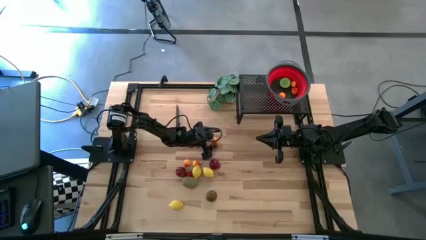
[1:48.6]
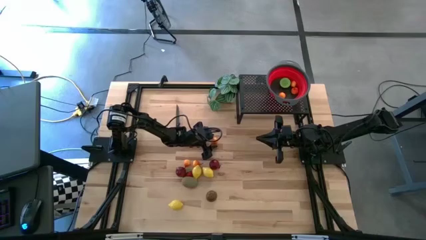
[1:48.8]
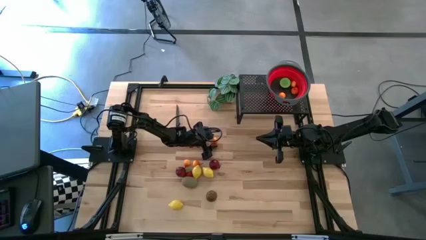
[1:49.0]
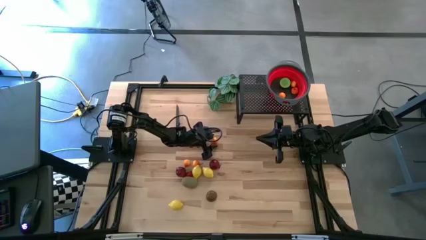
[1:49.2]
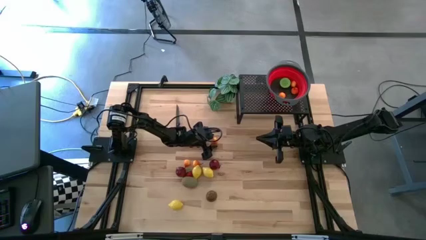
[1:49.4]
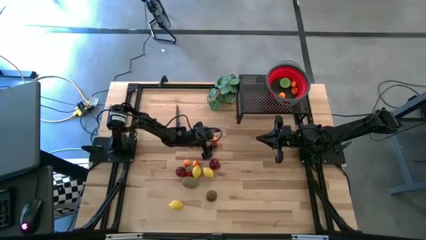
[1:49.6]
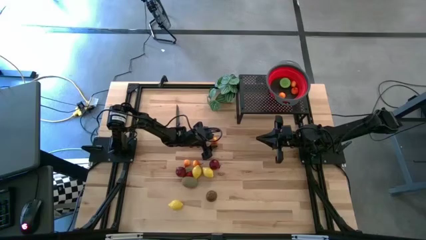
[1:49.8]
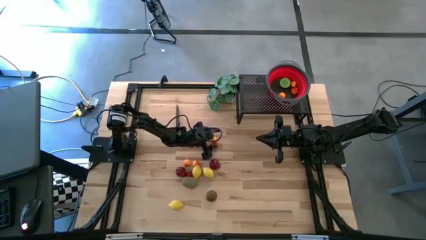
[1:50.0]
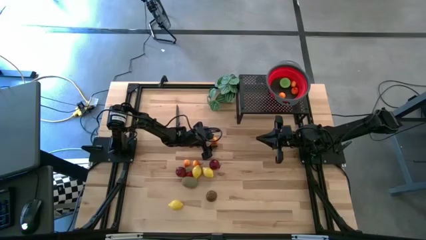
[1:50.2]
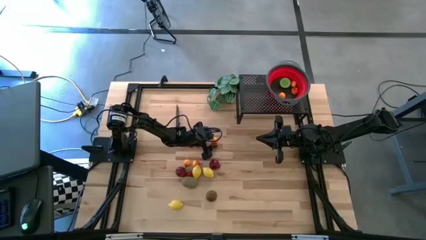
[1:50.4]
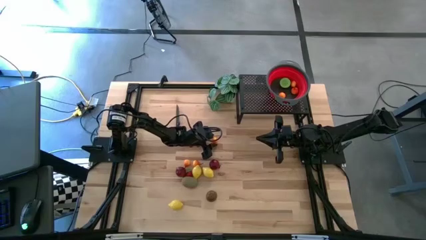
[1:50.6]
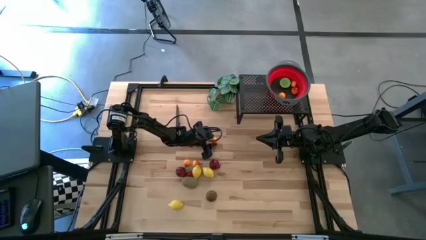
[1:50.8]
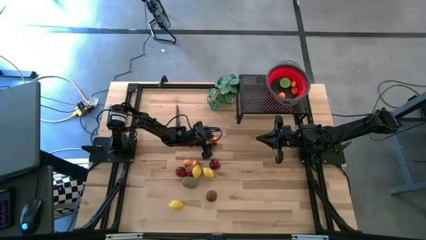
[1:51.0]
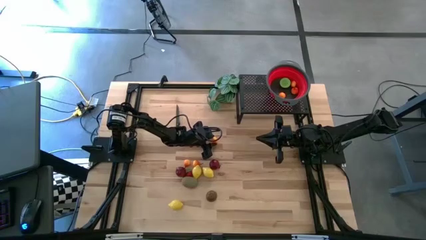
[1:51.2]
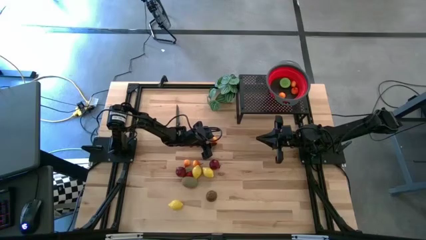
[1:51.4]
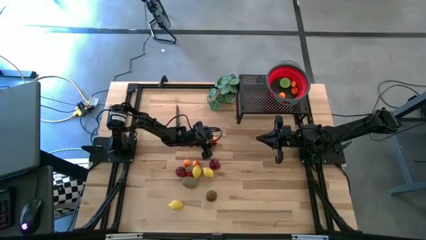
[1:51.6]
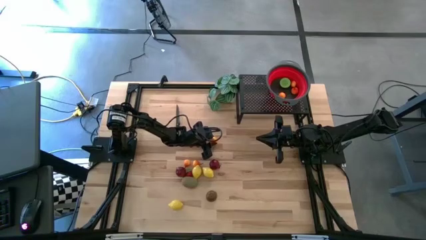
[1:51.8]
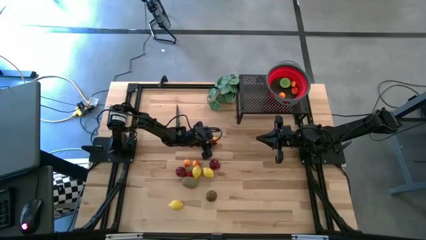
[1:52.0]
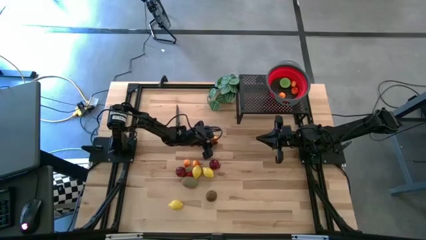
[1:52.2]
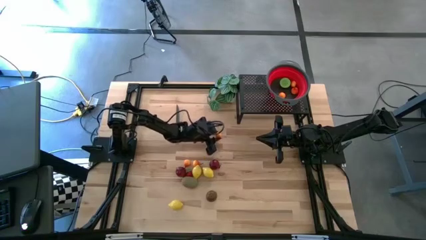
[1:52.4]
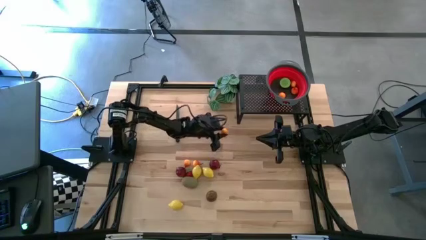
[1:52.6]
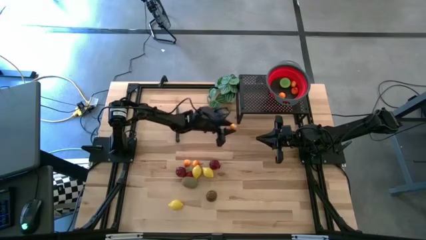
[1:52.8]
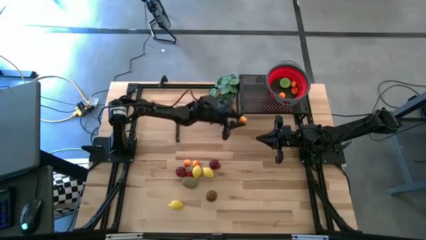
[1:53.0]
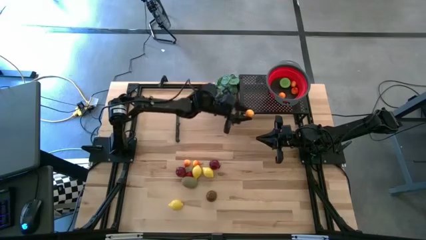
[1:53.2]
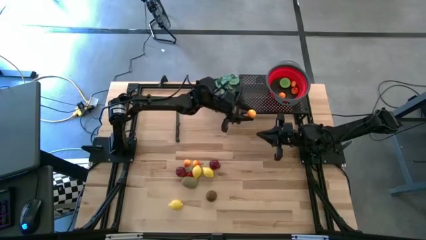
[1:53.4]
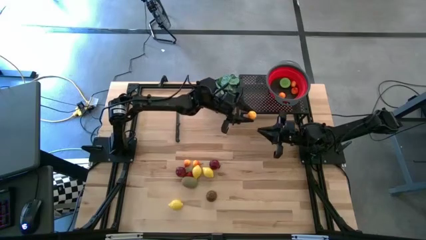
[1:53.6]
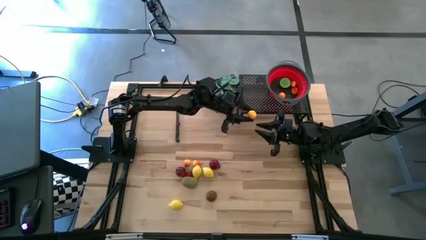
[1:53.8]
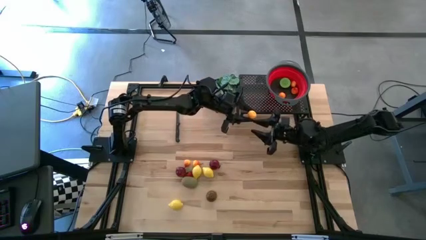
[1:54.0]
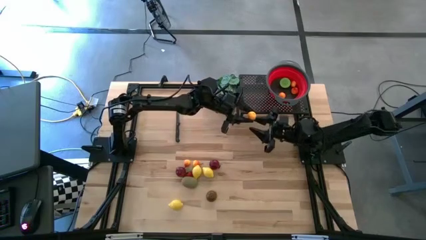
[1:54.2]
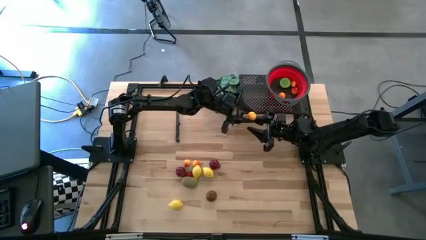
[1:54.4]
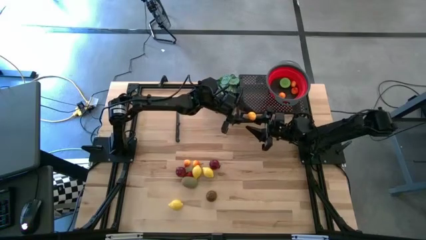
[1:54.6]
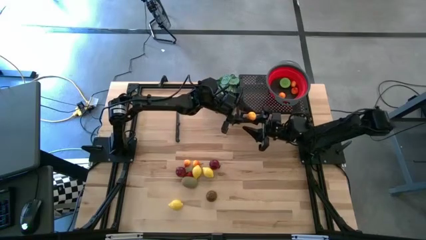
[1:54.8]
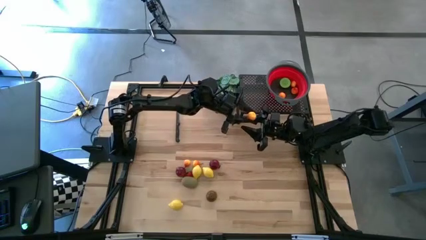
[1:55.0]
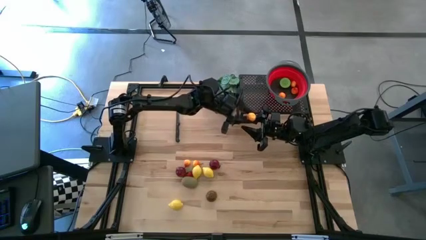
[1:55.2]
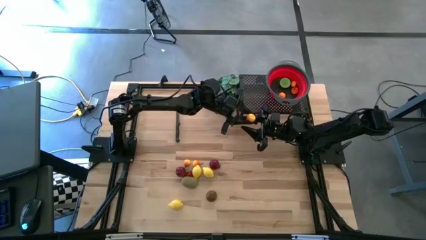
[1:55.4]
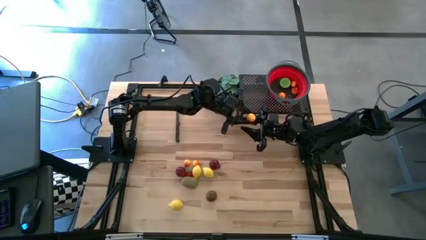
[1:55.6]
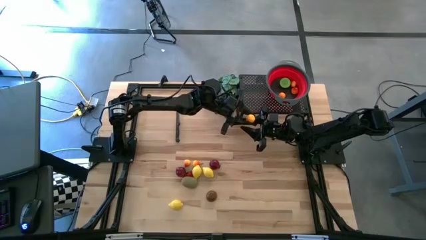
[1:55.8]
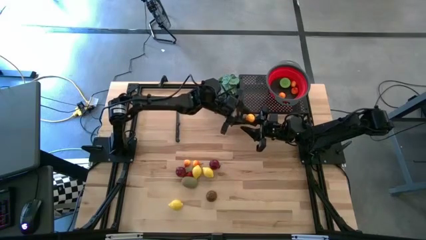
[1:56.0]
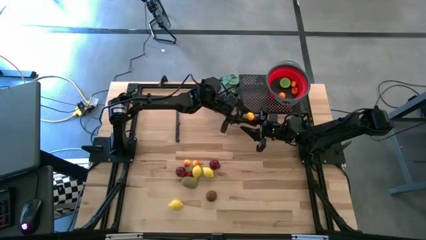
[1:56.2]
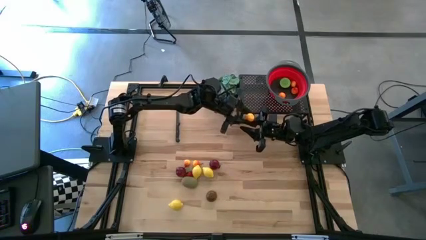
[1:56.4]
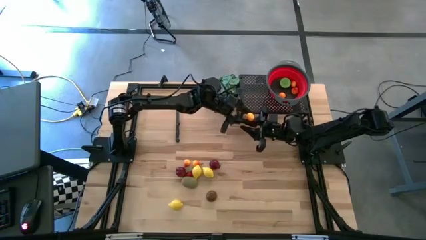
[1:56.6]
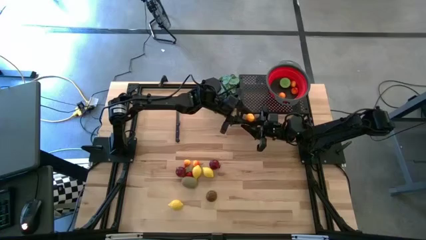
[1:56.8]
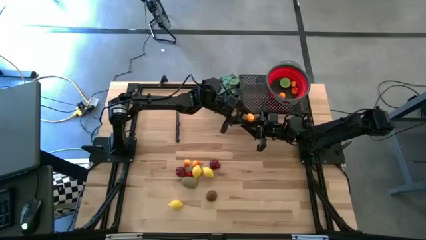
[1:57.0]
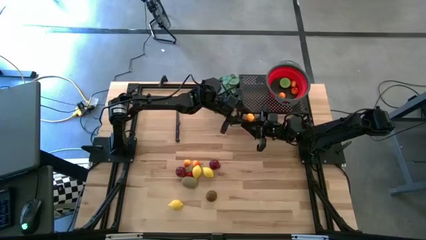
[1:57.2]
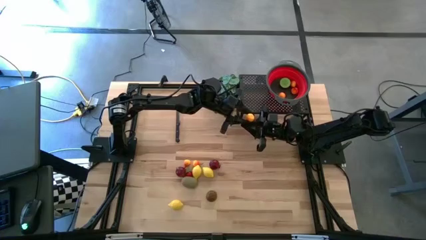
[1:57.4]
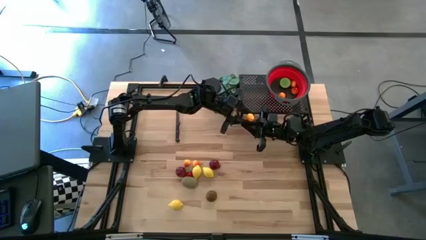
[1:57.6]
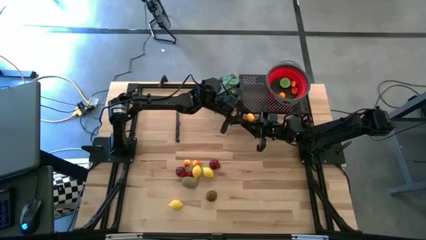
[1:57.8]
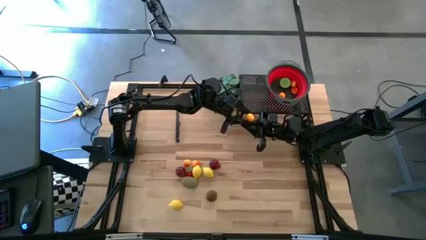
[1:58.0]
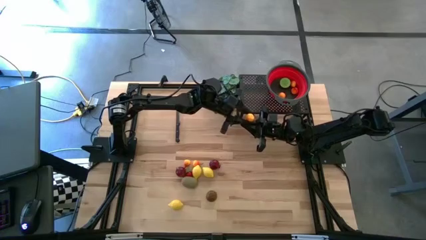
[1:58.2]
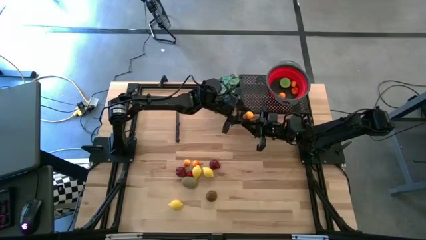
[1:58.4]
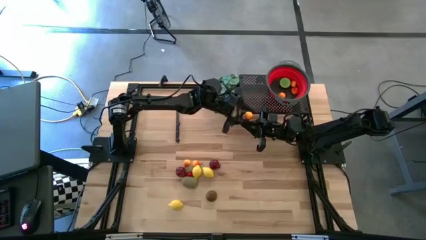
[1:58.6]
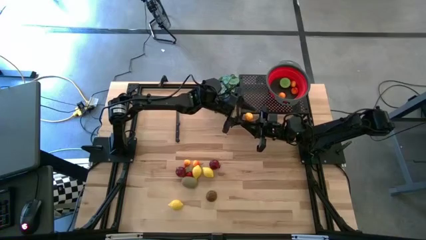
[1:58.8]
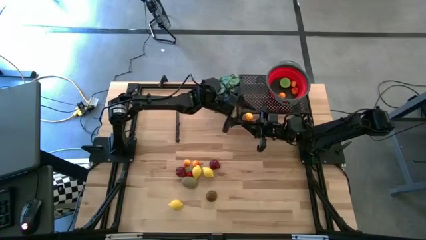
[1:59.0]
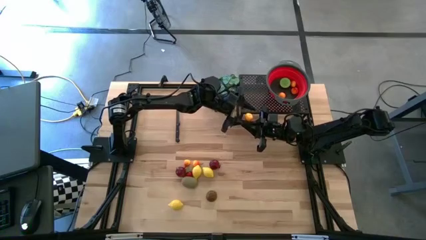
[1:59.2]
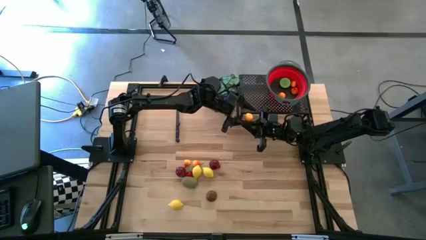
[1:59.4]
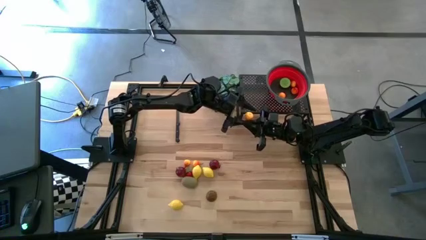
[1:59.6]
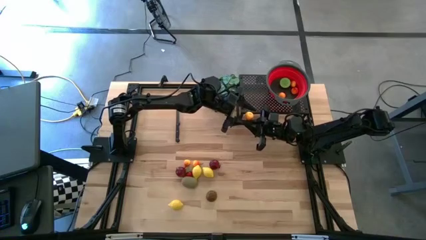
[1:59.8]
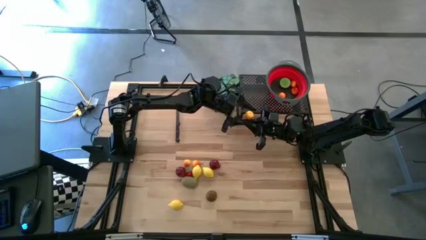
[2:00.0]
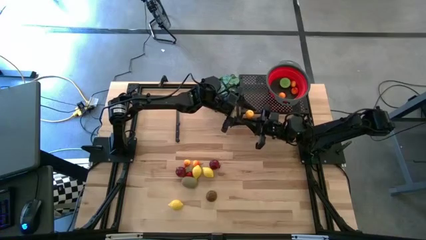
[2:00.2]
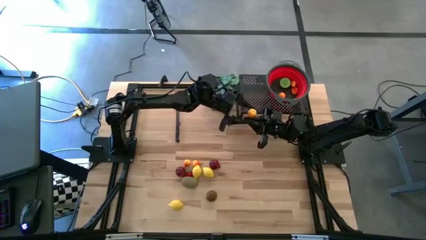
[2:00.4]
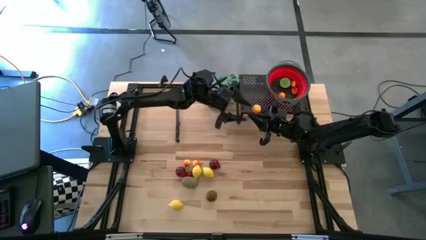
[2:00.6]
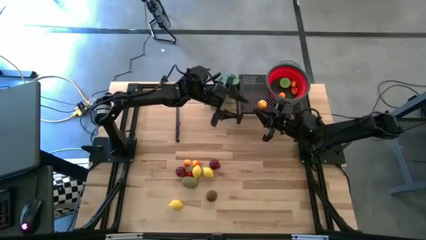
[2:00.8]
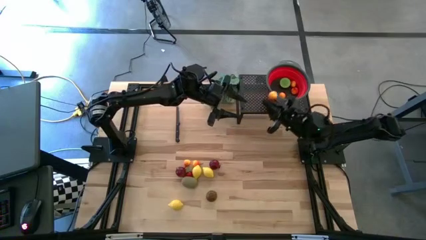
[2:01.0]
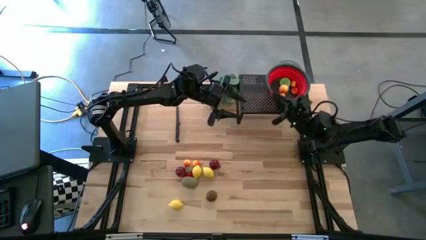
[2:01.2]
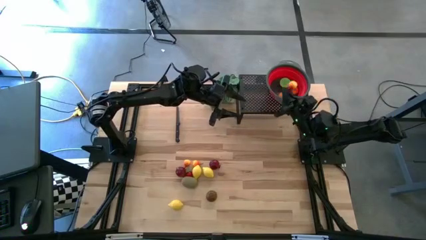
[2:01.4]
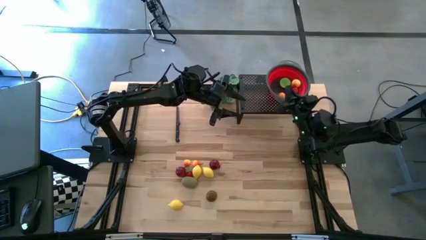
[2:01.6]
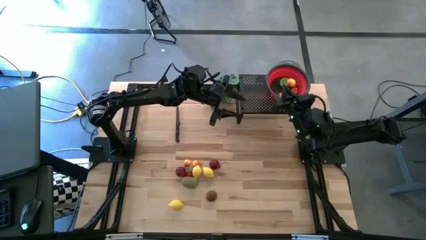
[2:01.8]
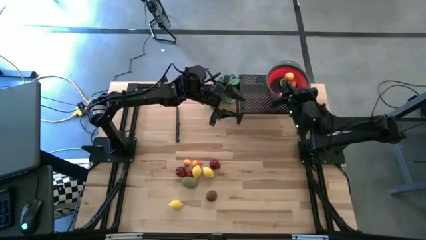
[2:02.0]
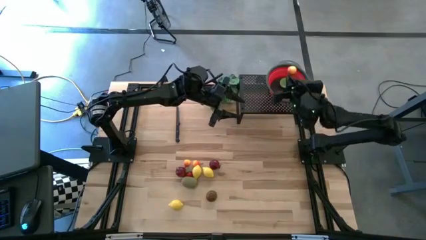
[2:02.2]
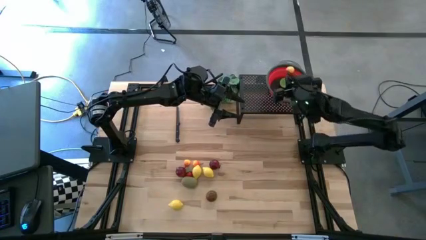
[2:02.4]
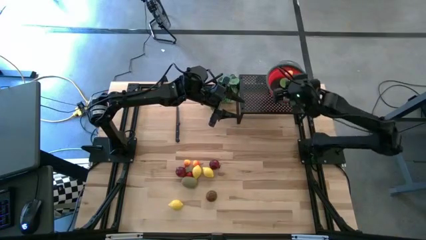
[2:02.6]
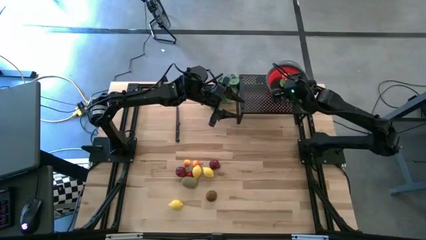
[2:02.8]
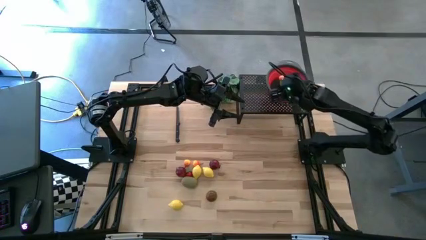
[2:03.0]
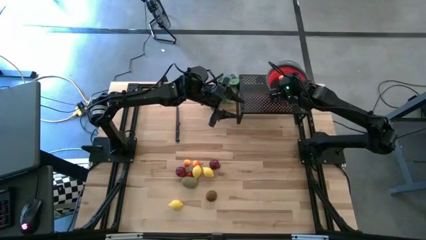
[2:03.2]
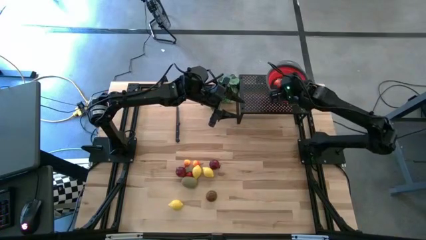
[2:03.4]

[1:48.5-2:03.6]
Task: Pick & Place Fruit
Put the orange pear into the red strainer bowl

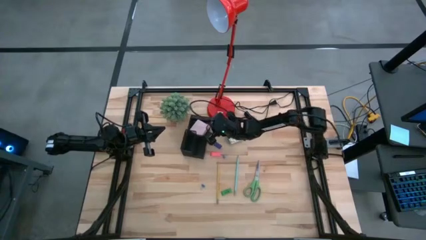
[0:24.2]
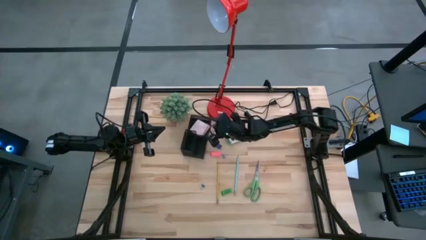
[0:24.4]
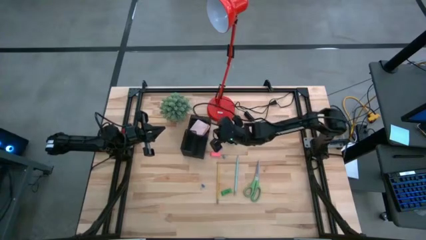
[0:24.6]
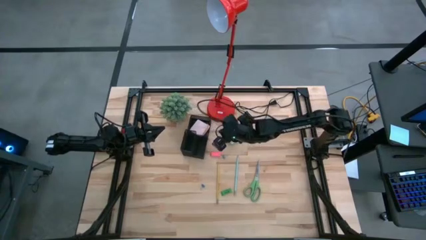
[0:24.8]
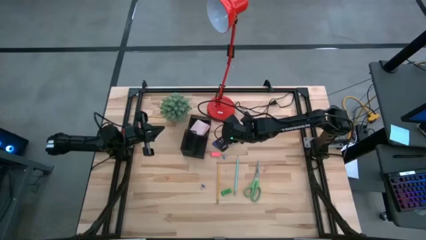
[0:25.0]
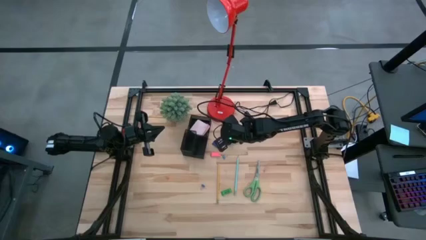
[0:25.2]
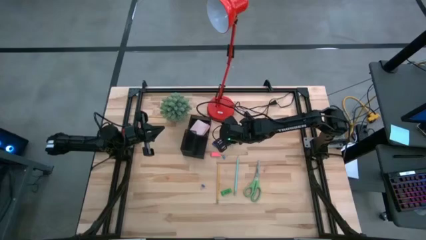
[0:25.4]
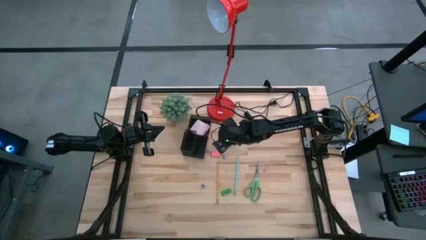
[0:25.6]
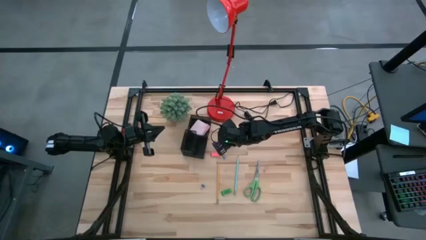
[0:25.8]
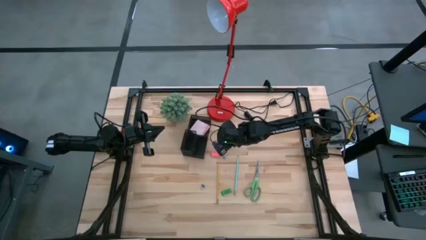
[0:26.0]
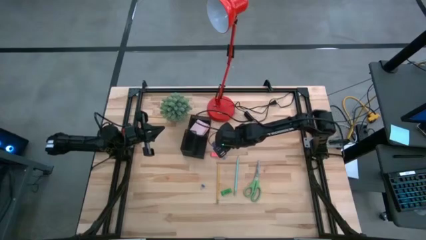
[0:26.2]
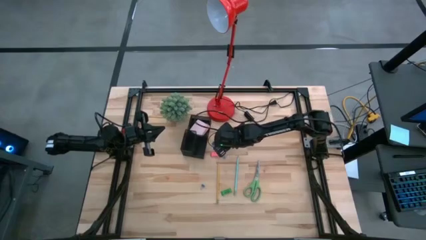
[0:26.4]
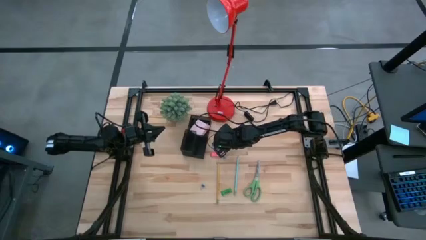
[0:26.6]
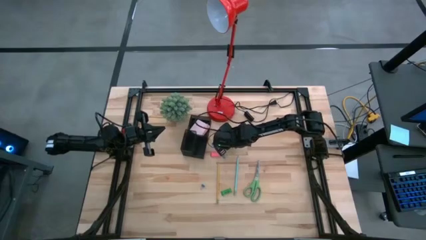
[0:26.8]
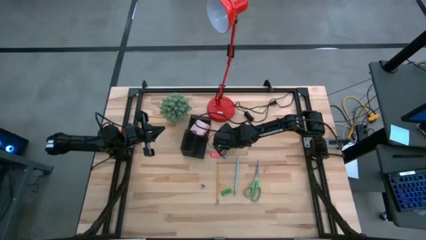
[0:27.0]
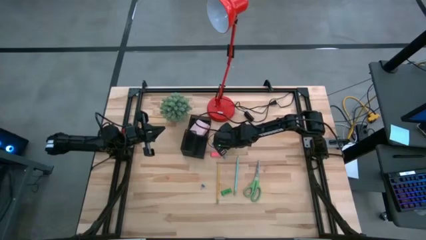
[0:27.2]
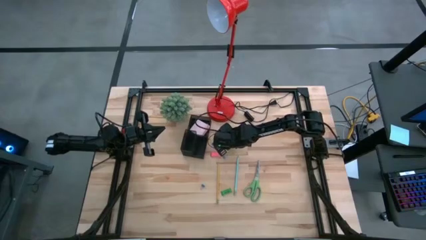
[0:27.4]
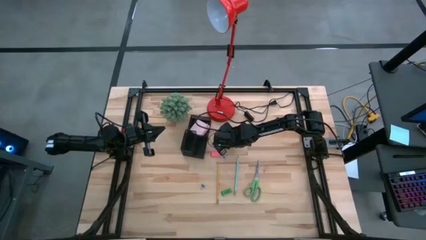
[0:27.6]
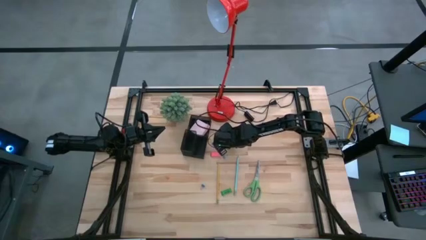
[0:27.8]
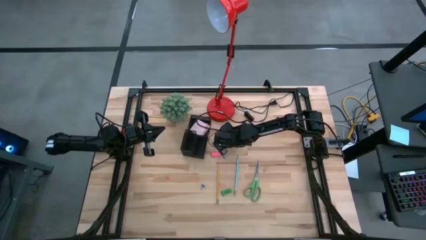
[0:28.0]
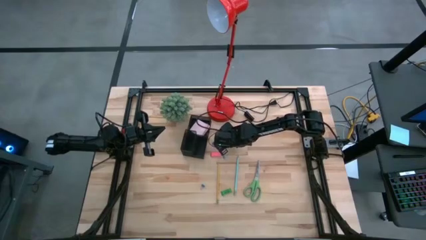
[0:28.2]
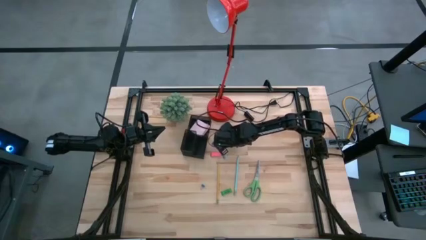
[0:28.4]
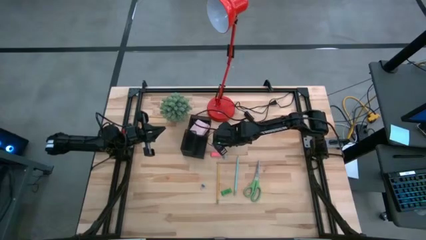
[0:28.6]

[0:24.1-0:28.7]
Task: Pick and place office supplies into organizer
Put the green sticky notes in the black desk organizer
